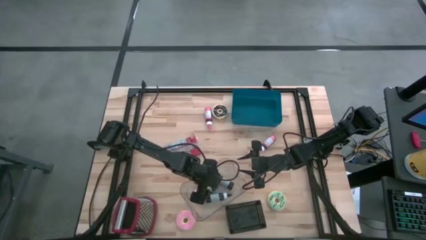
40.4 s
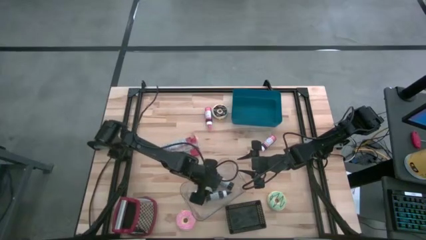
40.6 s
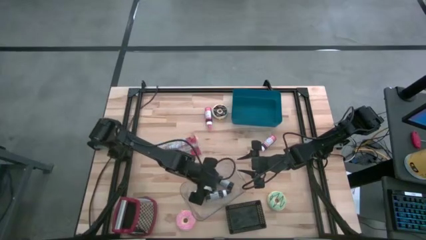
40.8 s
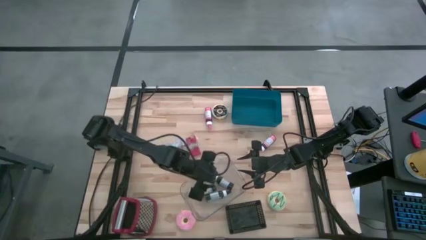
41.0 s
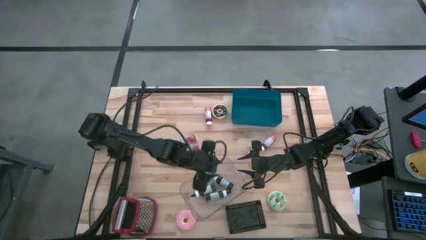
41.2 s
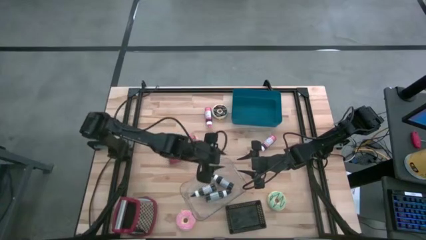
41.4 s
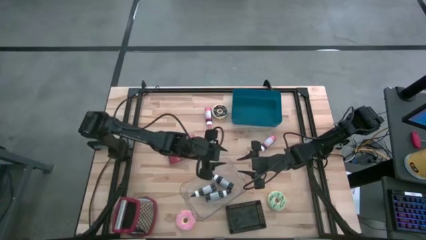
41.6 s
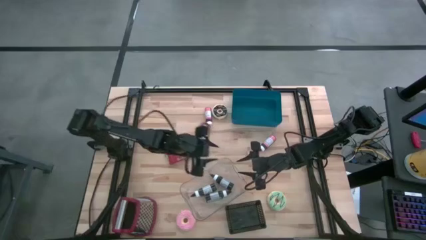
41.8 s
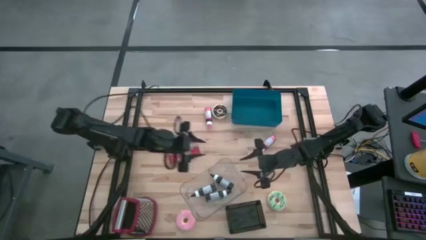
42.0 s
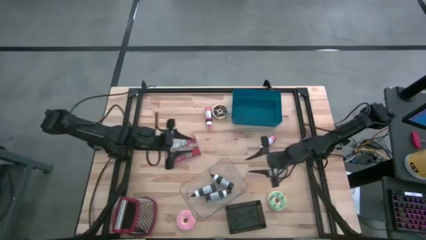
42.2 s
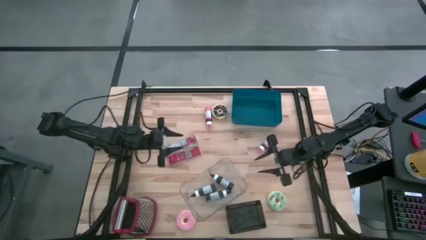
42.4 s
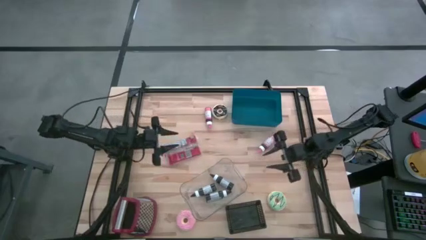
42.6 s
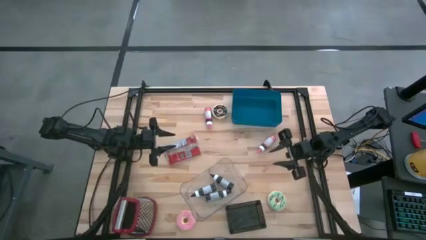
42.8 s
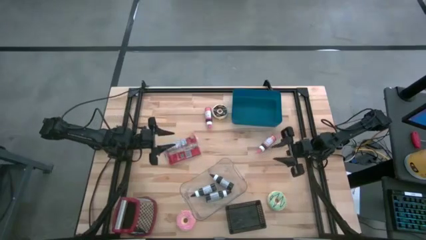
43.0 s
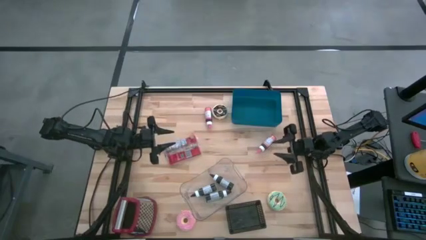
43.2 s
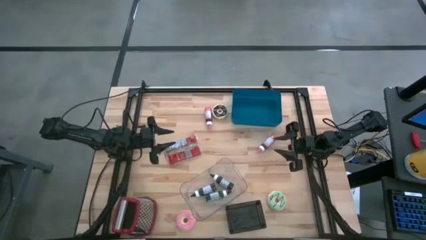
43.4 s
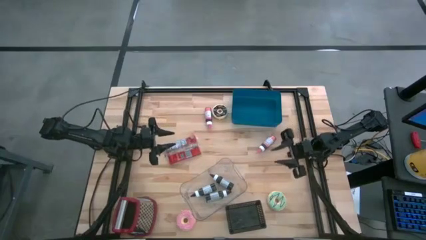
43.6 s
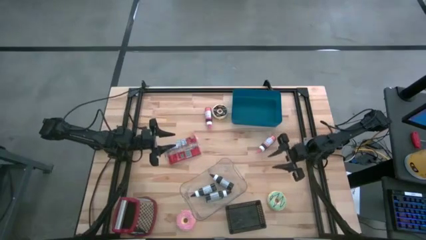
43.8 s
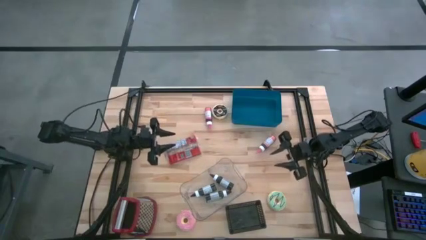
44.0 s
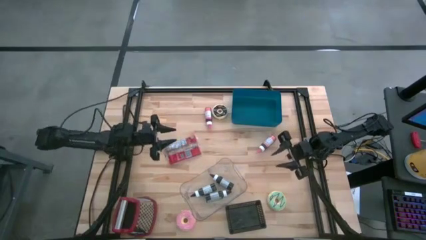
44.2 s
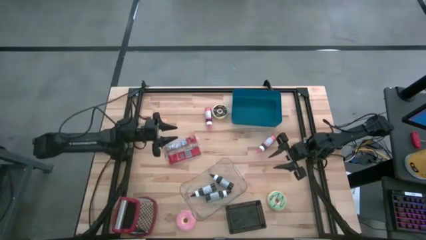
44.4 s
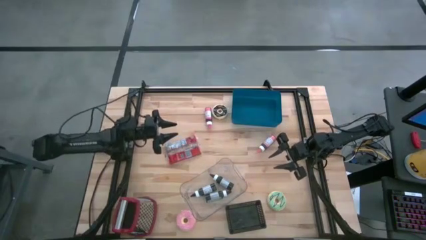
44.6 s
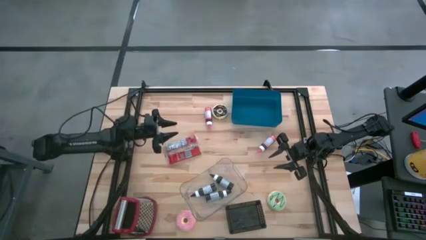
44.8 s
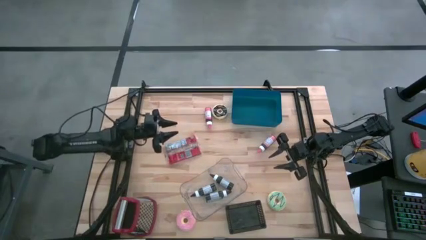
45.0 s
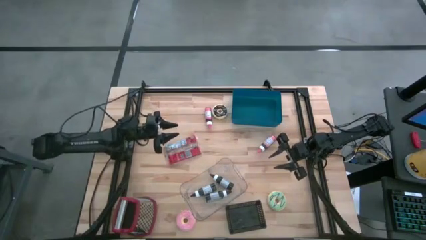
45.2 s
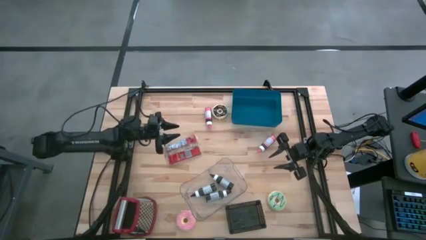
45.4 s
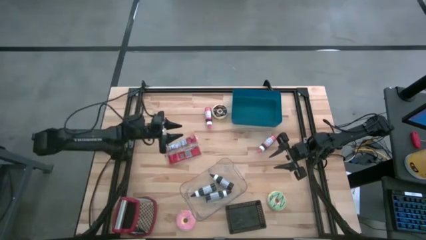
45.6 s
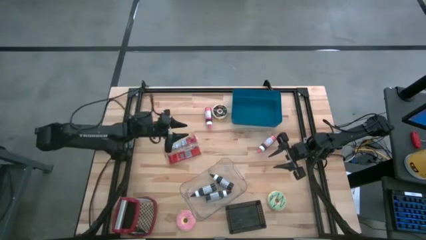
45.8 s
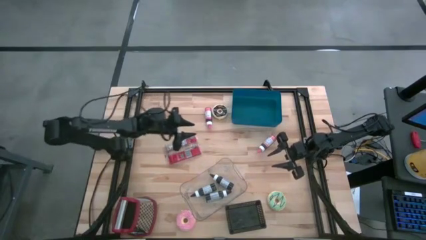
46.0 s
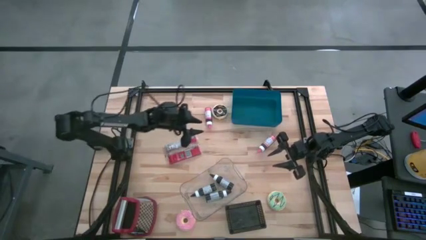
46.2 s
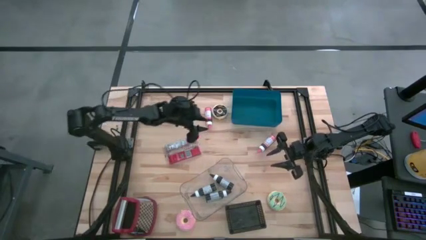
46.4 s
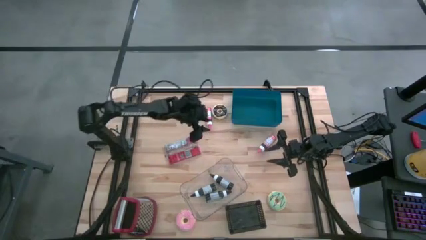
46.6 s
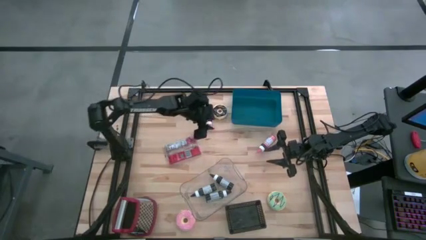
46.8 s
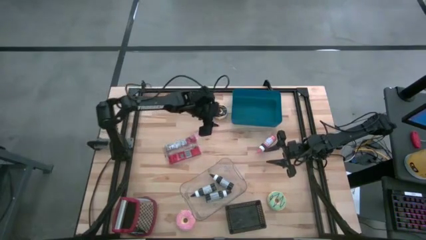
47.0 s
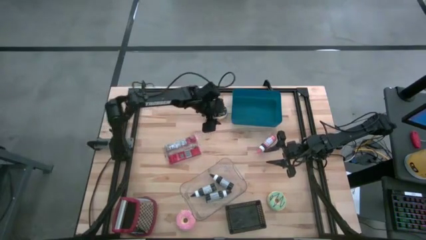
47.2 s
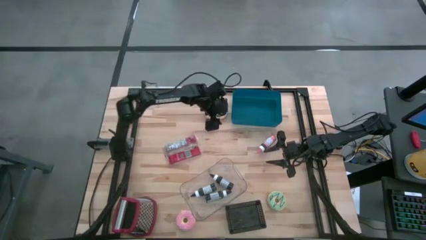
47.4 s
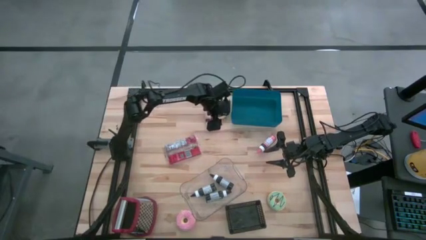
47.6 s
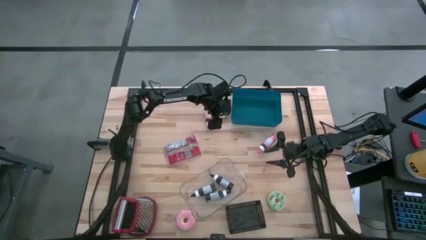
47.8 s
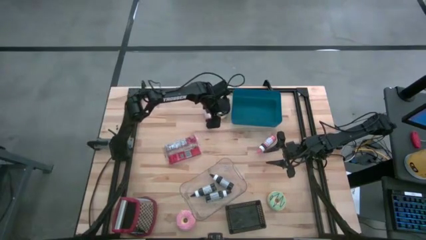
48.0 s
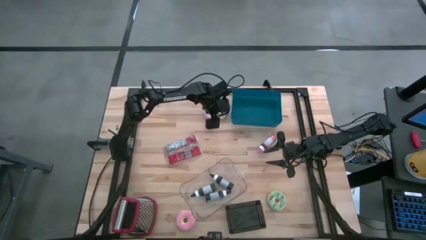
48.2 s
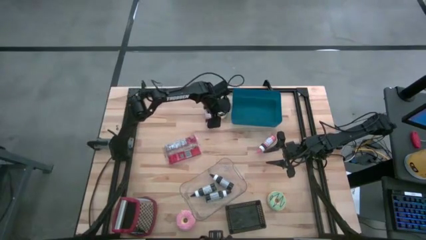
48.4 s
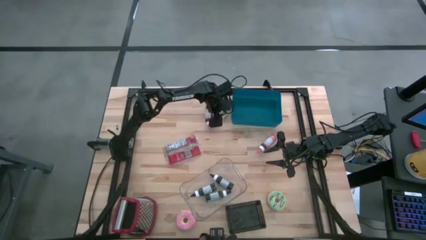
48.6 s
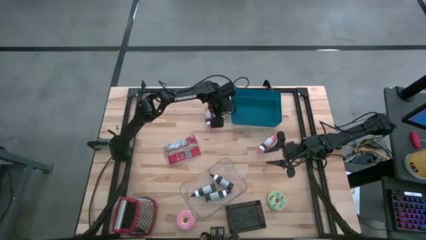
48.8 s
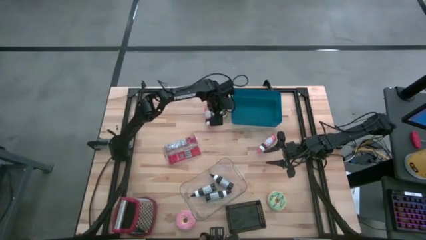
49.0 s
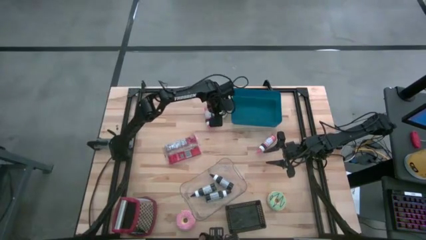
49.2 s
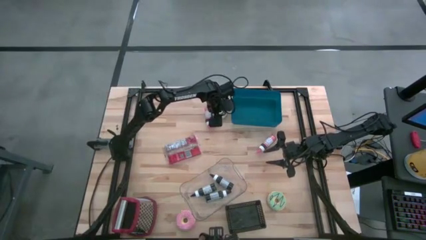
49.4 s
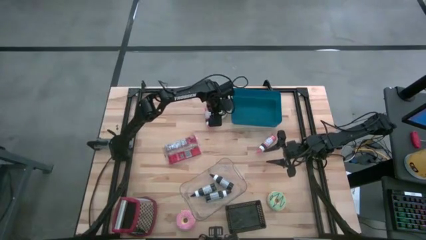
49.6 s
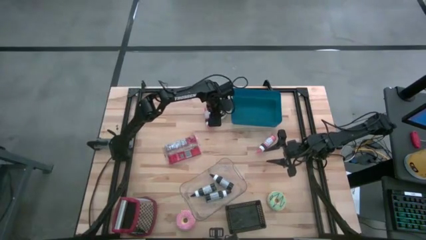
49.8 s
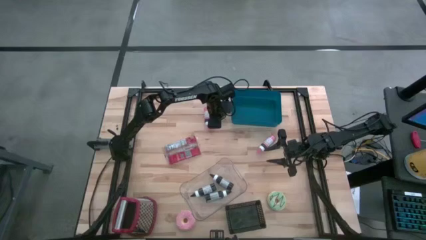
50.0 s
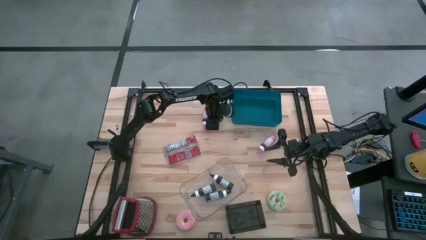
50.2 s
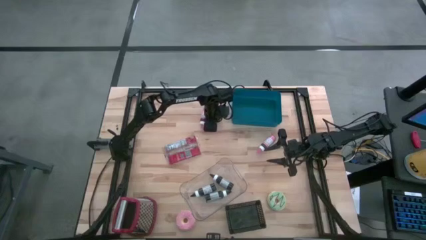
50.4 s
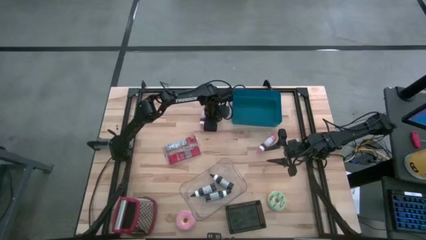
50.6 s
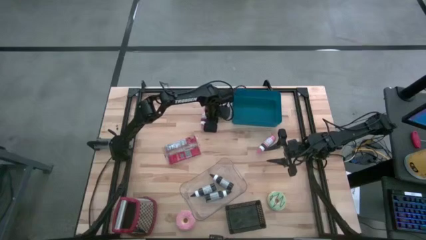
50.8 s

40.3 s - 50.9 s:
Put the black donut into the black basket

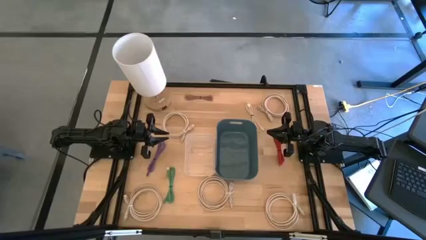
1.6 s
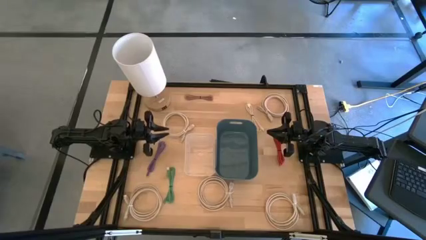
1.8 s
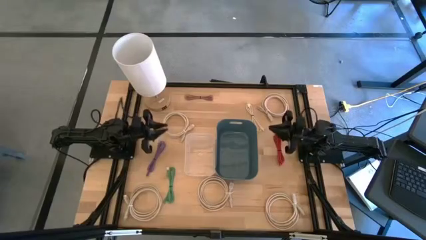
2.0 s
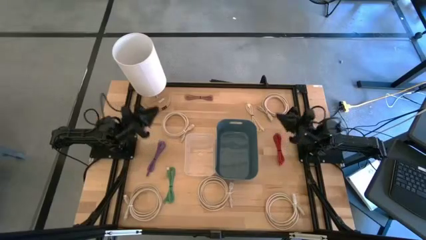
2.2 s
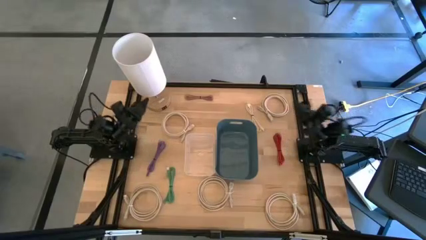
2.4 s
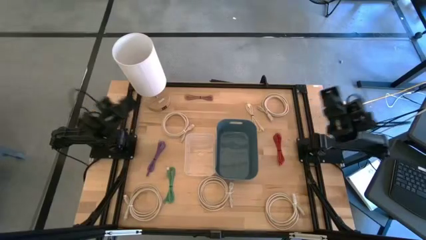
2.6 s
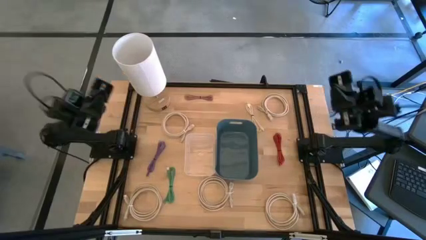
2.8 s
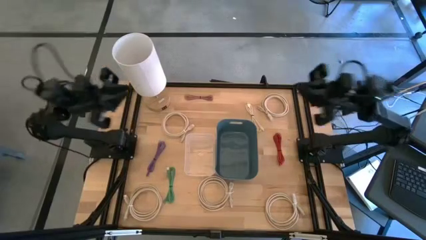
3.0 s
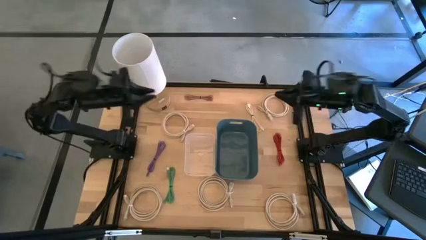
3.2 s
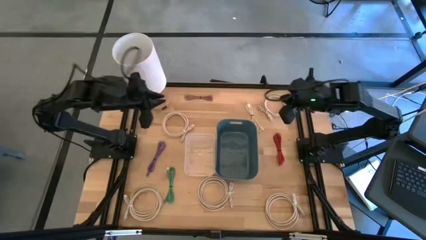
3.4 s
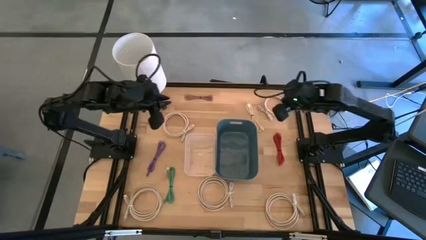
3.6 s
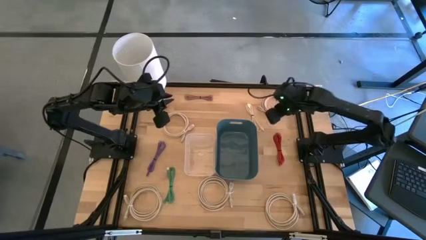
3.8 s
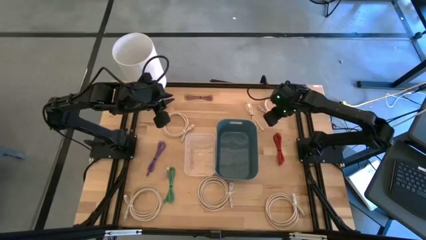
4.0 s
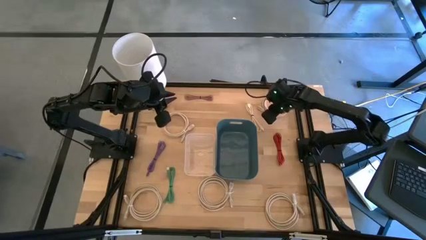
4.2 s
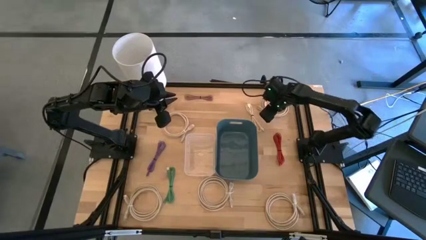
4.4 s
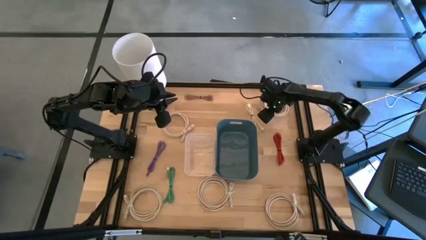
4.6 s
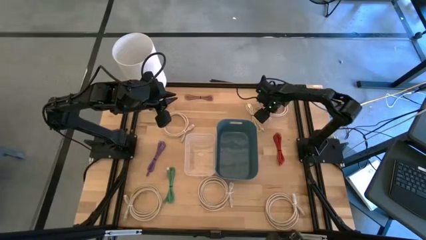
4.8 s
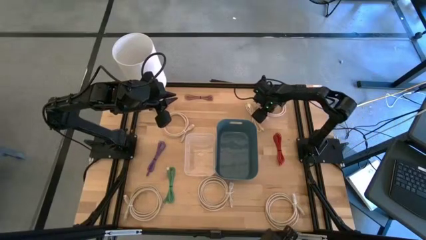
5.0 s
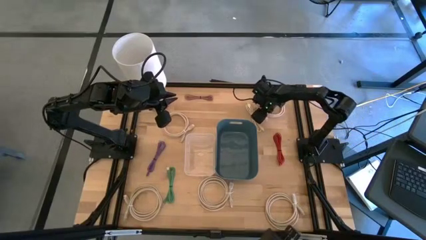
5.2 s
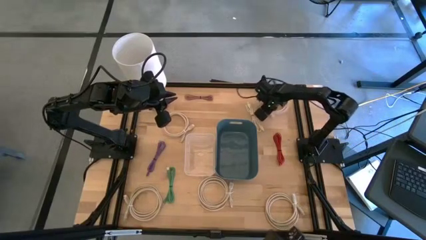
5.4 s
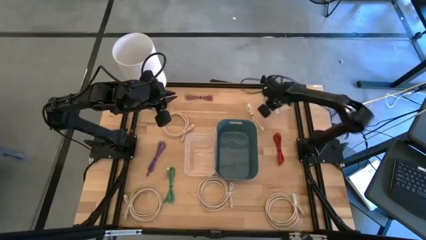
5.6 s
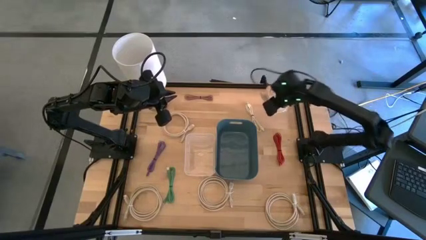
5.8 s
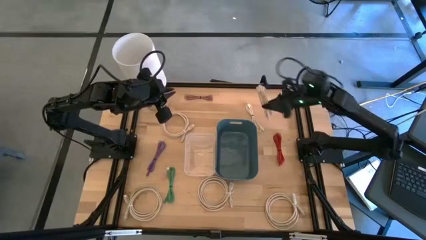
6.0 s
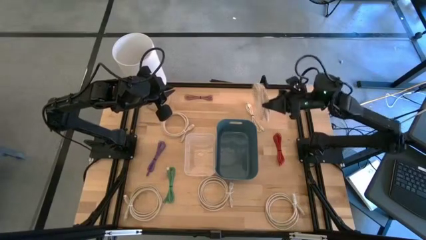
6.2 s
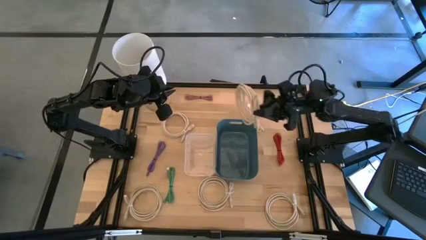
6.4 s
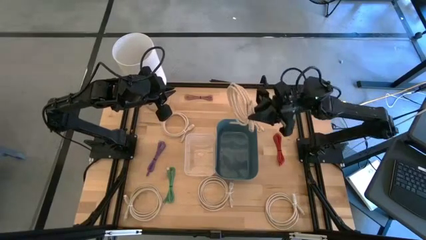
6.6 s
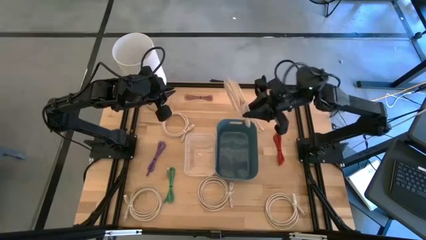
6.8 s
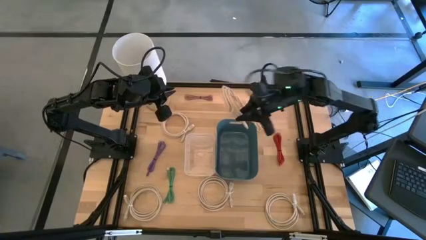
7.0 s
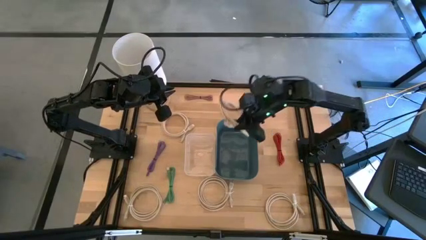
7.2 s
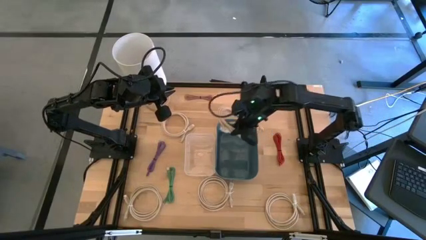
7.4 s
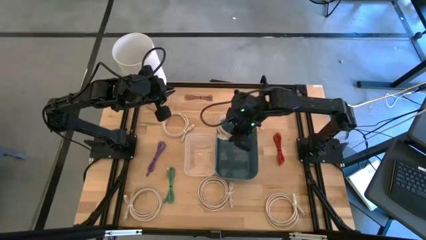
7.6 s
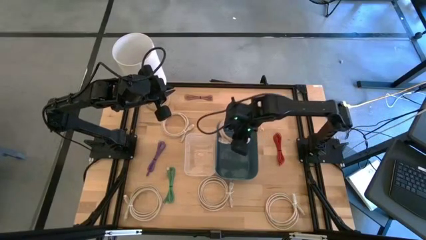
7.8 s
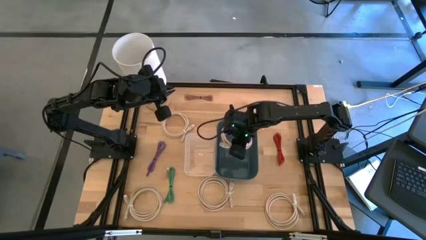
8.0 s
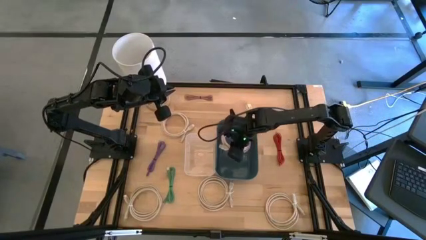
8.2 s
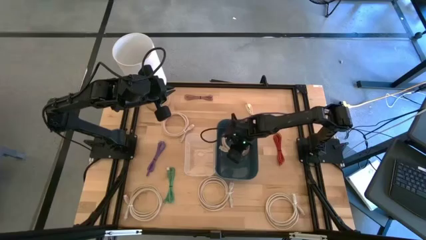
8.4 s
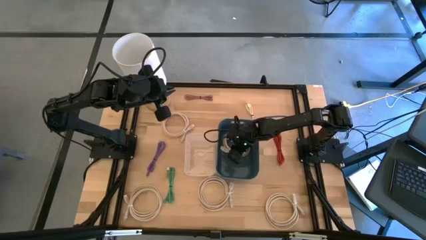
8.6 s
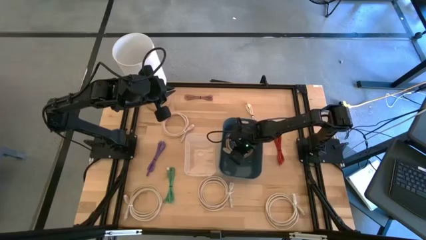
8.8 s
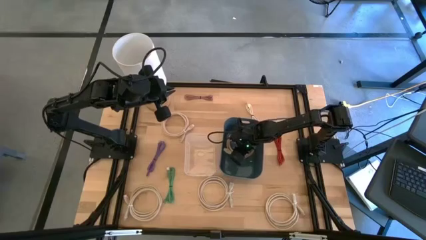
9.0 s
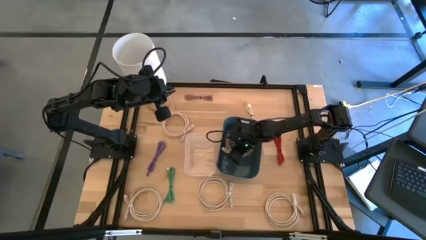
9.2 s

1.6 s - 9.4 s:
Put the light brown HDMI cable into the blue bin
